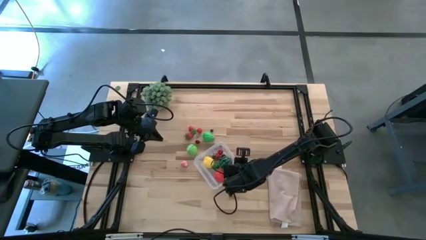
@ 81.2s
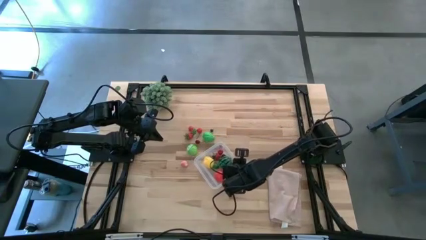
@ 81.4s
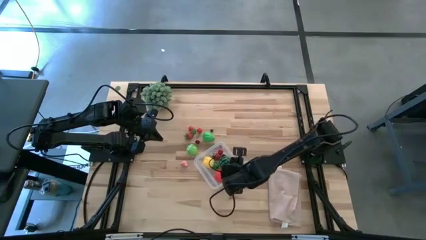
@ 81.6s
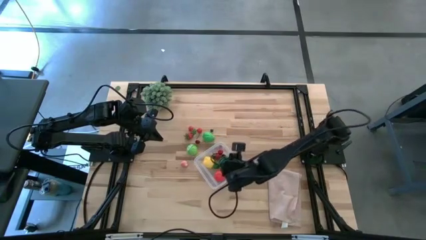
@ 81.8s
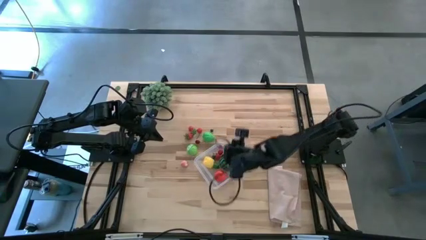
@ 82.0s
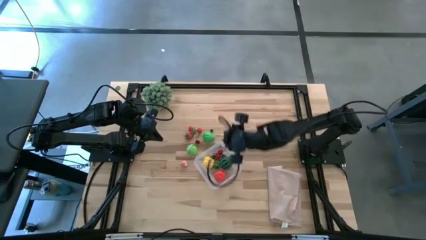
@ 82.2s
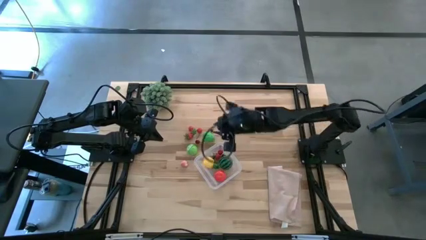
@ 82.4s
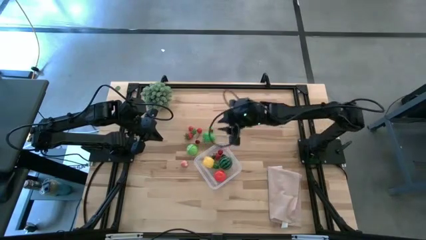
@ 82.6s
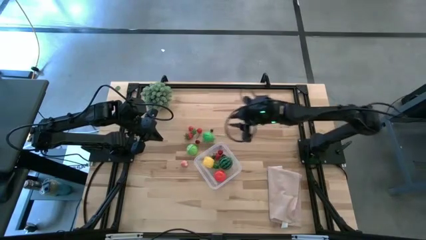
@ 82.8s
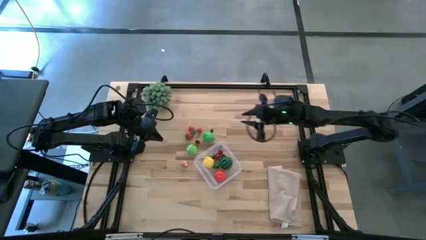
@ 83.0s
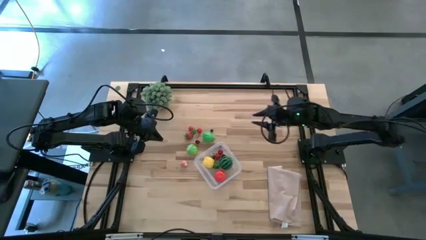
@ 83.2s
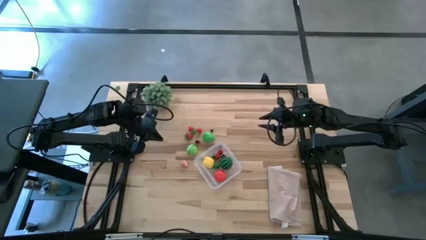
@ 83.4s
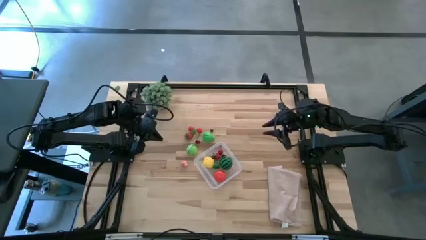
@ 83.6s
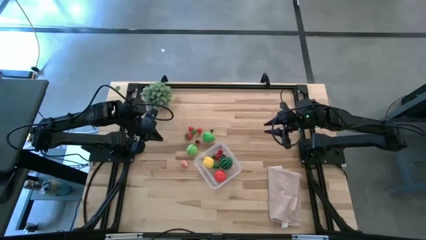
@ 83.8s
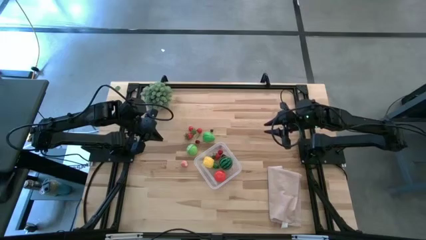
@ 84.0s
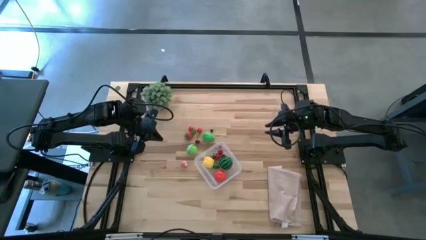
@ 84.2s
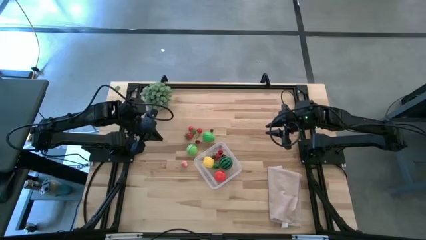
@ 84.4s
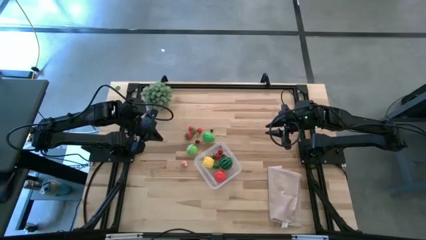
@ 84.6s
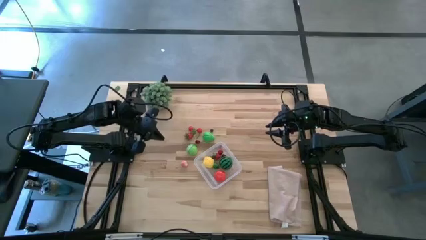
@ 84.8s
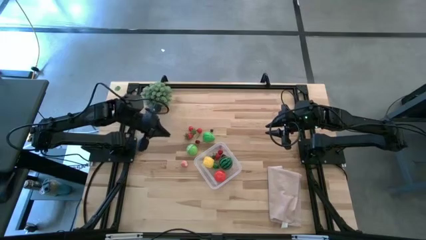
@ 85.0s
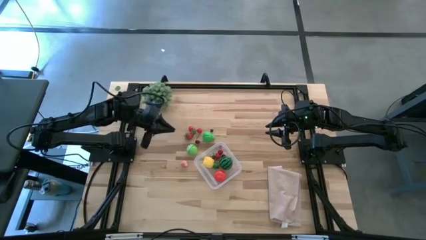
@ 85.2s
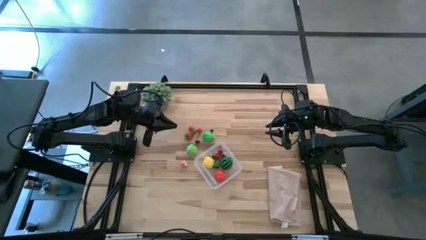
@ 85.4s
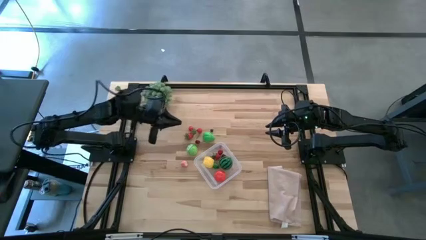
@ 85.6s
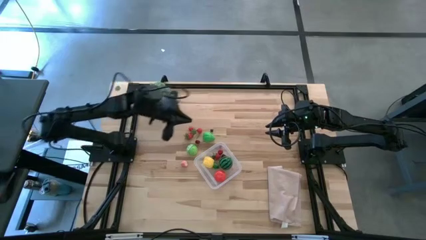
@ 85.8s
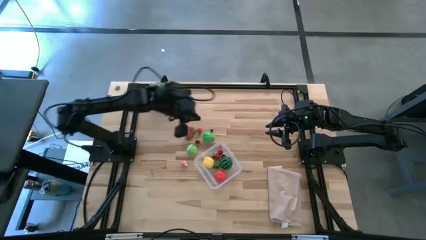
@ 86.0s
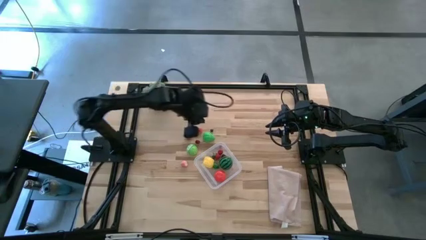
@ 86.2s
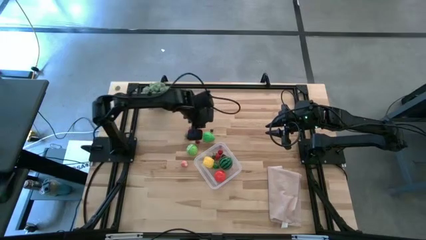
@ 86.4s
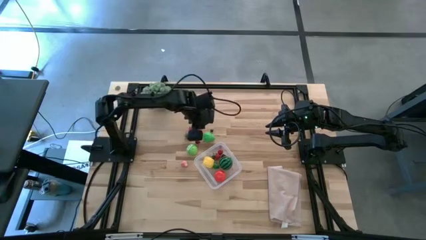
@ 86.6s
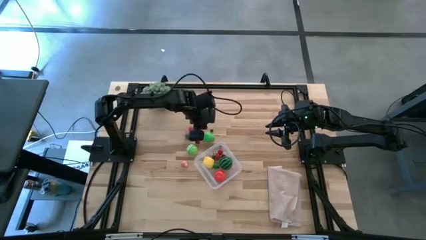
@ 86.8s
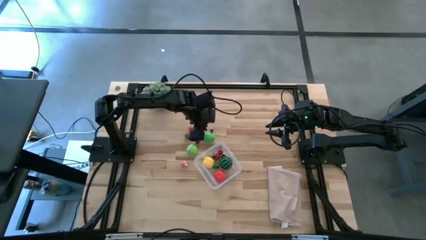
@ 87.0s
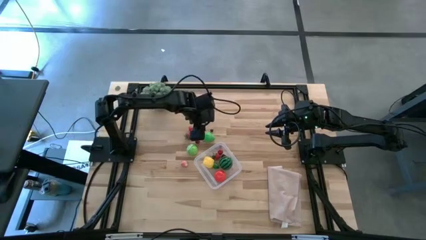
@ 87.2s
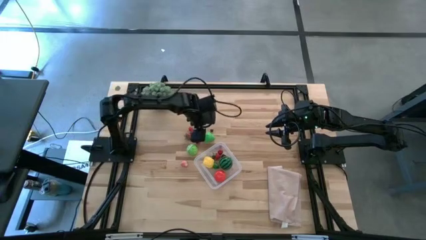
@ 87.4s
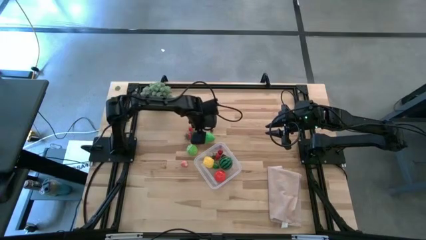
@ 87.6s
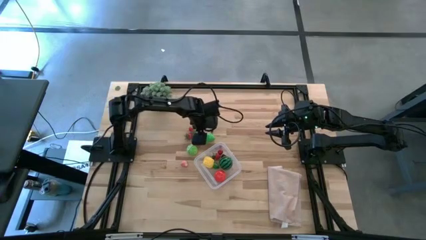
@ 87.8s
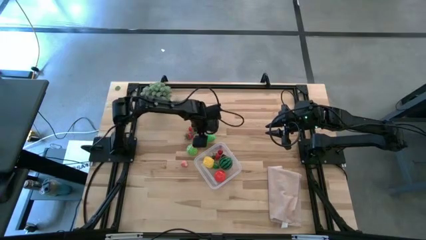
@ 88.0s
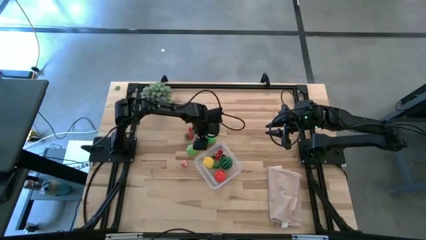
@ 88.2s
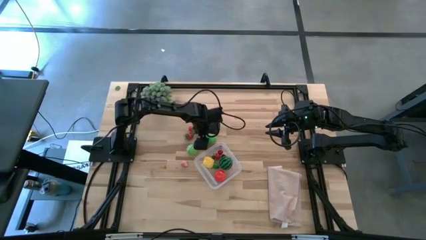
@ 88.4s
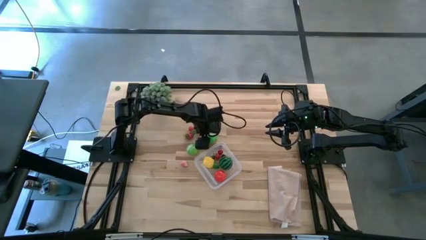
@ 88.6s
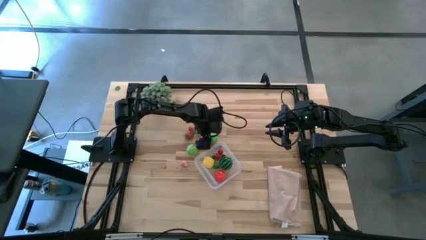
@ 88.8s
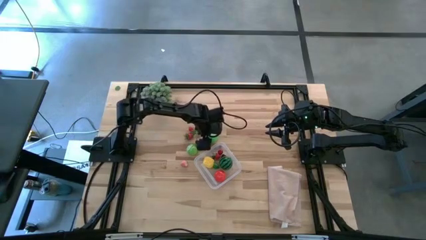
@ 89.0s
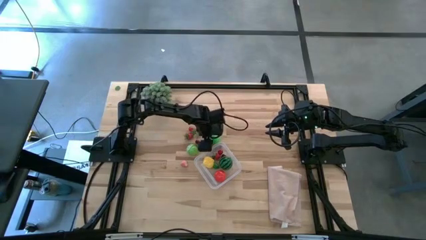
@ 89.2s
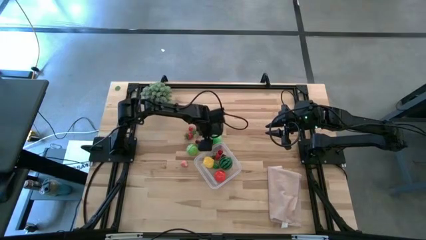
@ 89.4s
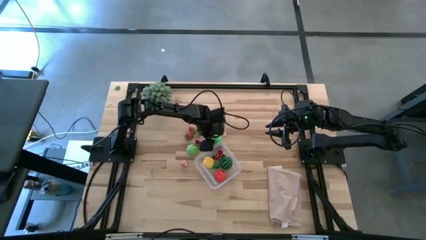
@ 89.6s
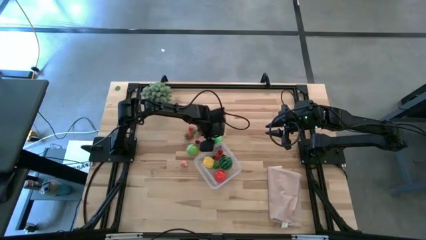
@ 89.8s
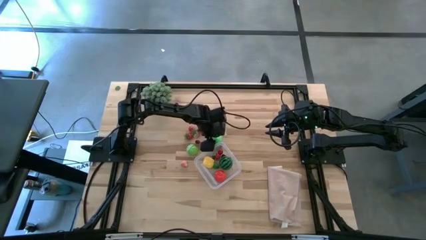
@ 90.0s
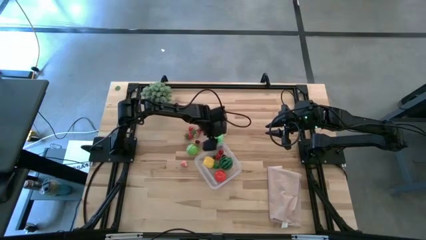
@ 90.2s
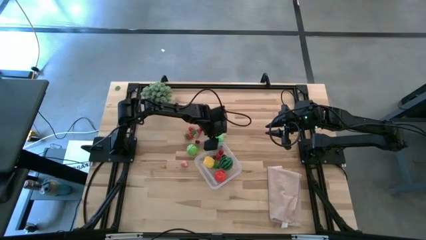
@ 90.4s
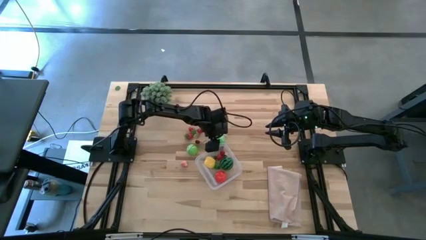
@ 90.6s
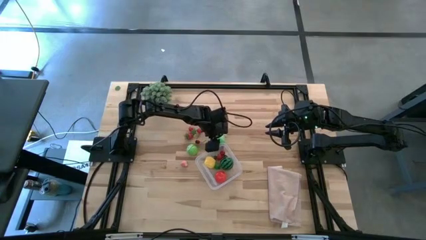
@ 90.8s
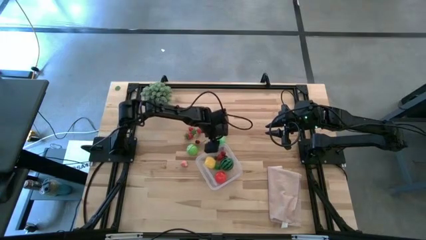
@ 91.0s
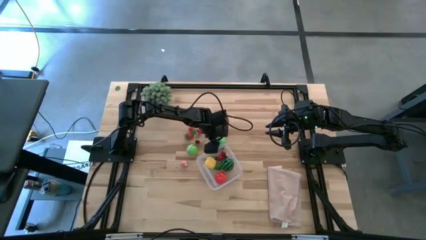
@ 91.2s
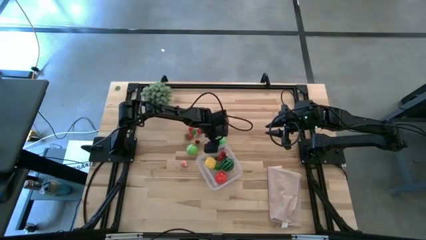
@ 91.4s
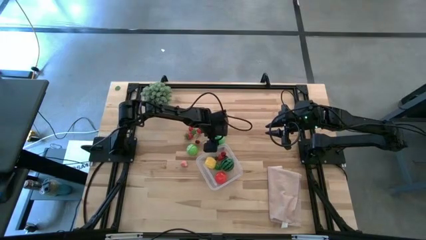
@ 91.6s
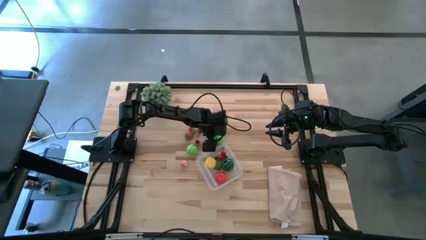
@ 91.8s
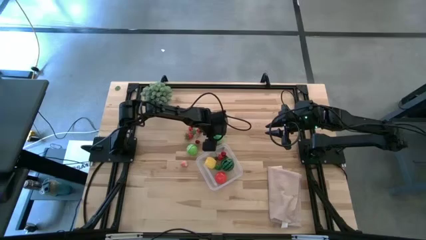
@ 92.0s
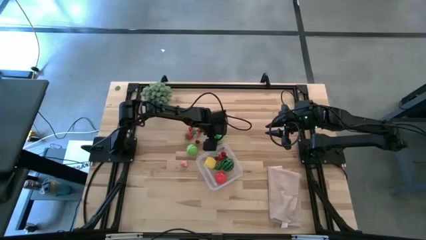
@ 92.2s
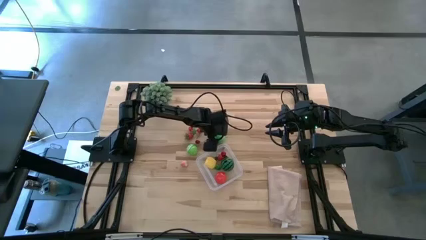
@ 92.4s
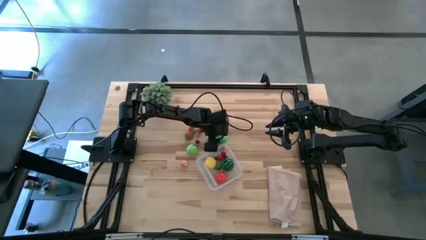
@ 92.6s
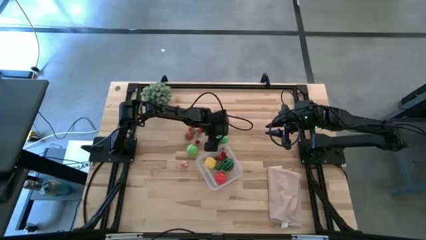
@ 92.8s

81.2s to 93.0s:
Task: Pick and placing Produce into tupperware
Put the green pear into the transparent bin
